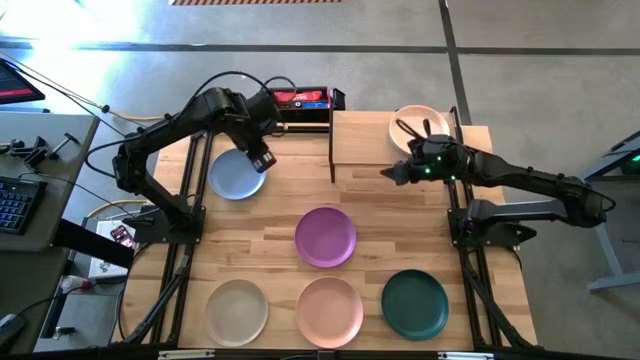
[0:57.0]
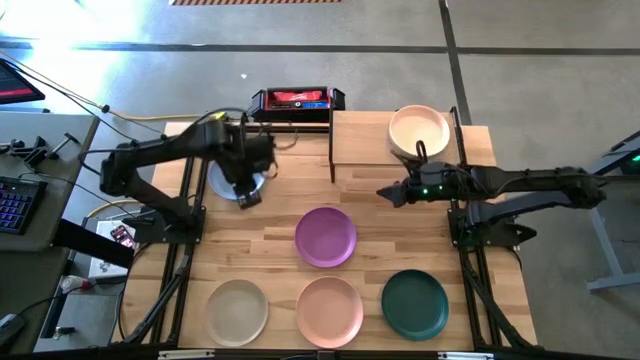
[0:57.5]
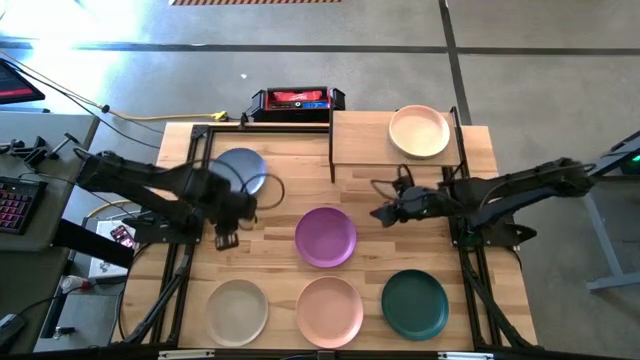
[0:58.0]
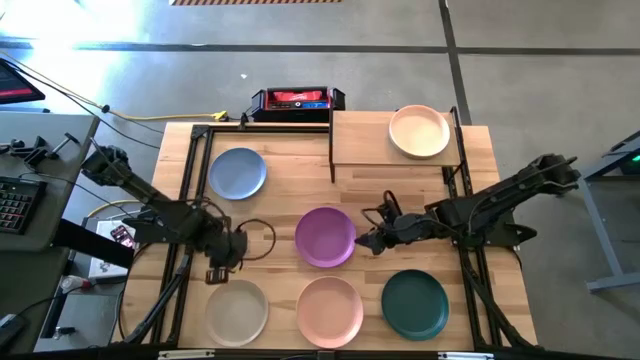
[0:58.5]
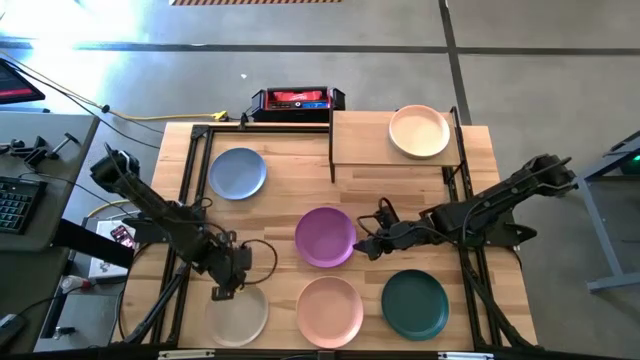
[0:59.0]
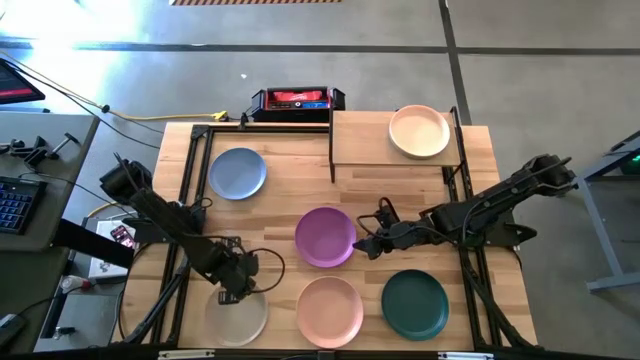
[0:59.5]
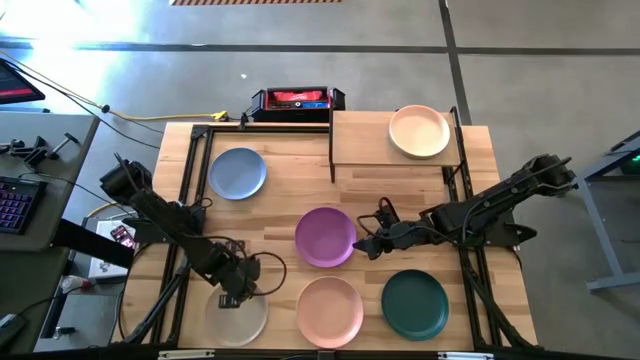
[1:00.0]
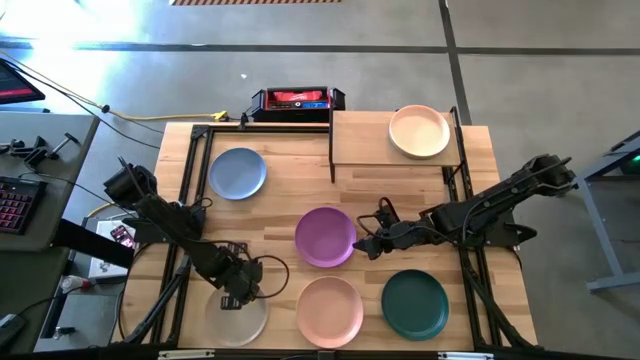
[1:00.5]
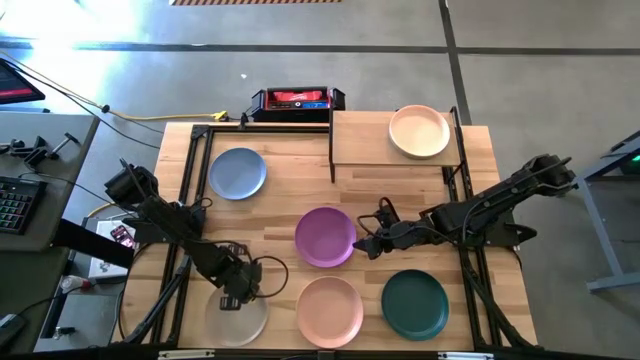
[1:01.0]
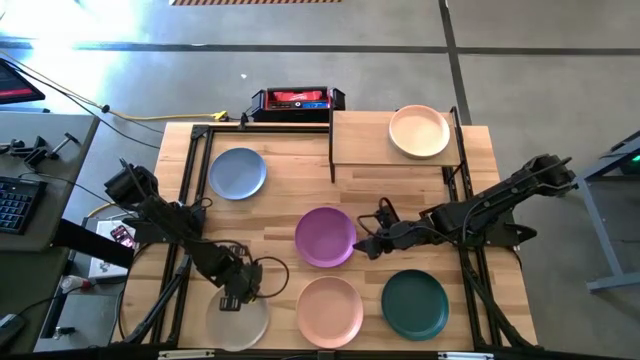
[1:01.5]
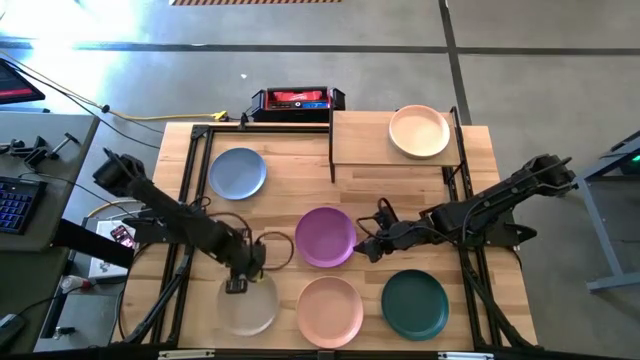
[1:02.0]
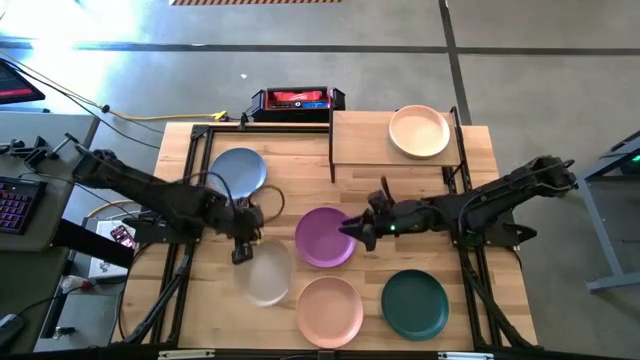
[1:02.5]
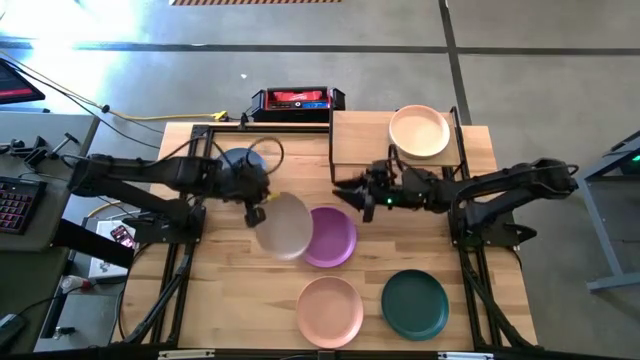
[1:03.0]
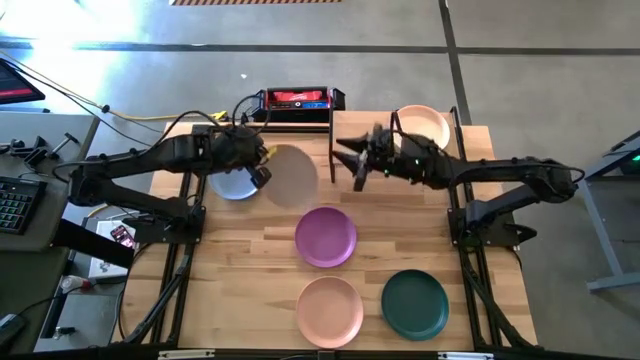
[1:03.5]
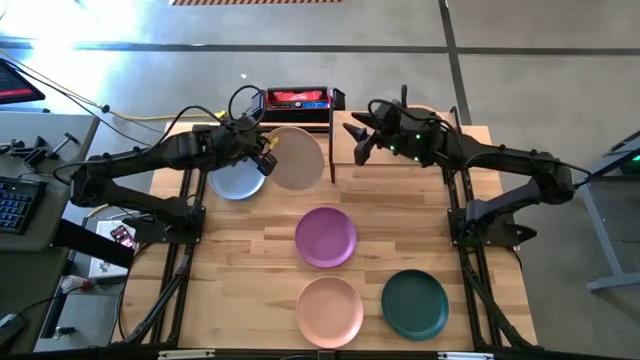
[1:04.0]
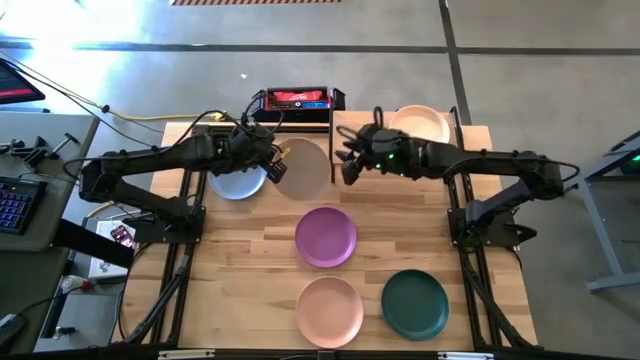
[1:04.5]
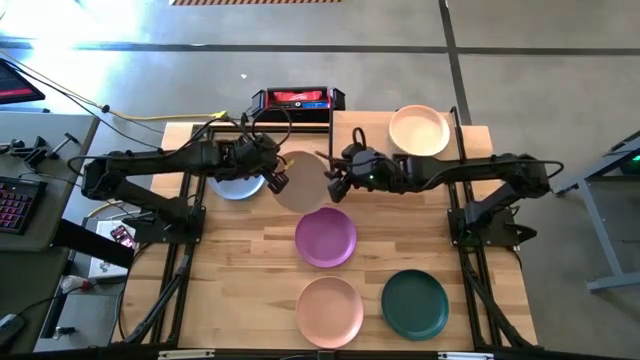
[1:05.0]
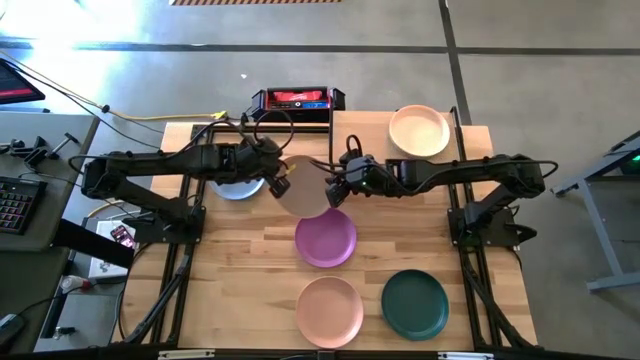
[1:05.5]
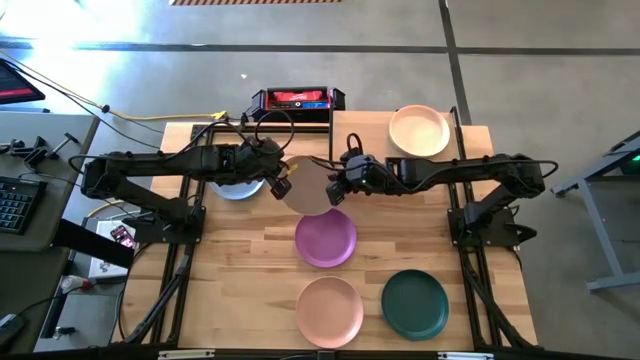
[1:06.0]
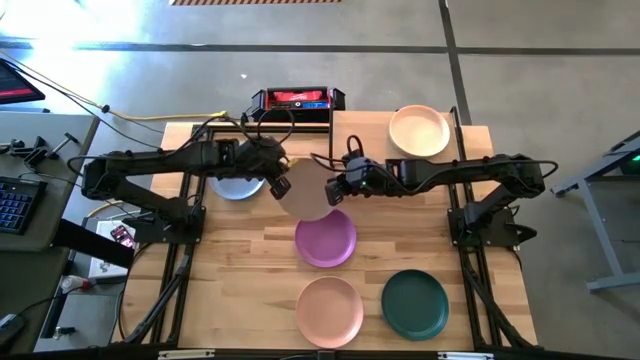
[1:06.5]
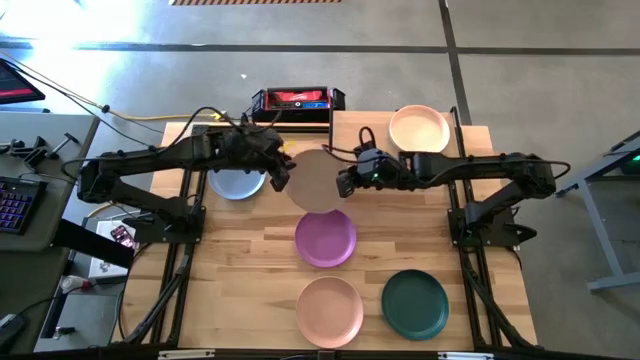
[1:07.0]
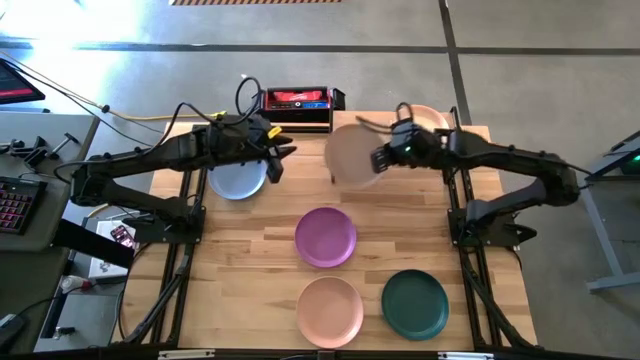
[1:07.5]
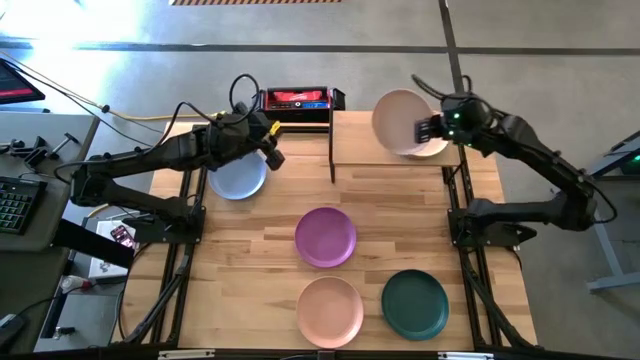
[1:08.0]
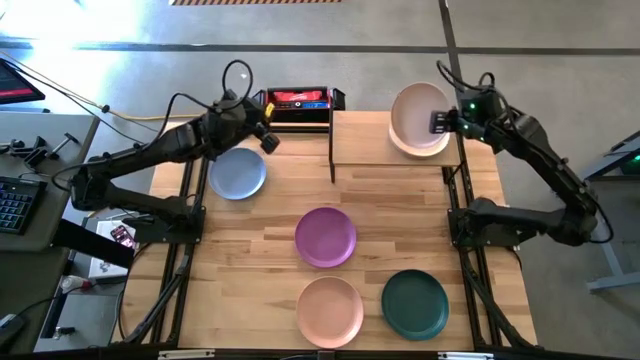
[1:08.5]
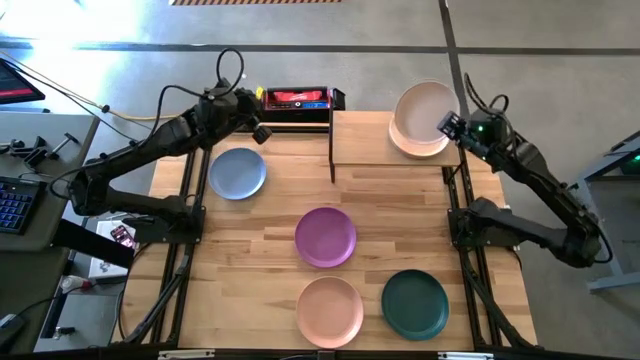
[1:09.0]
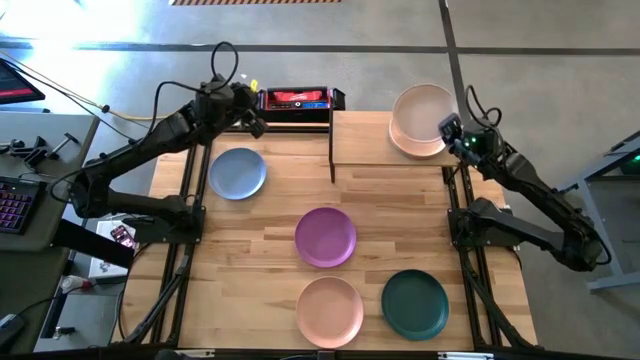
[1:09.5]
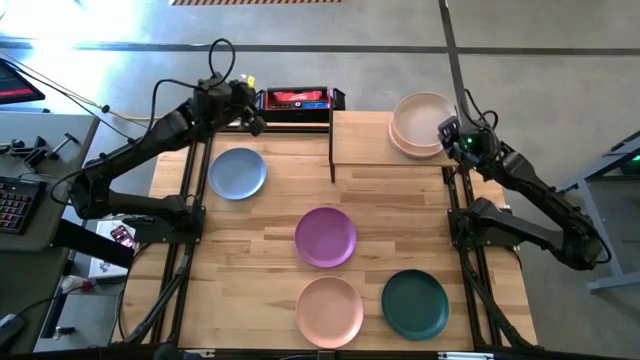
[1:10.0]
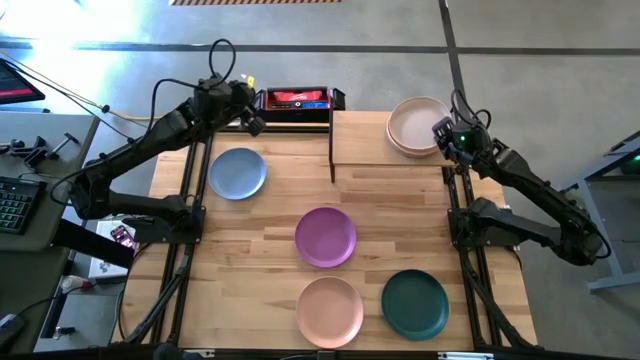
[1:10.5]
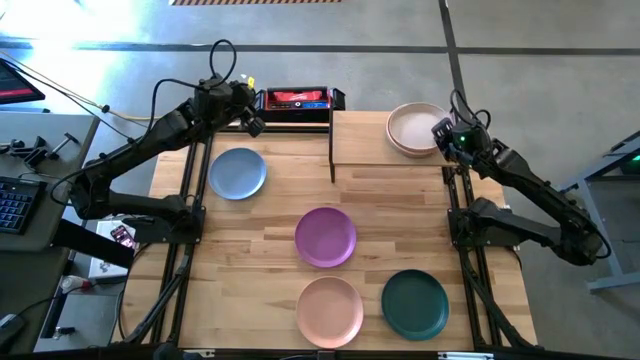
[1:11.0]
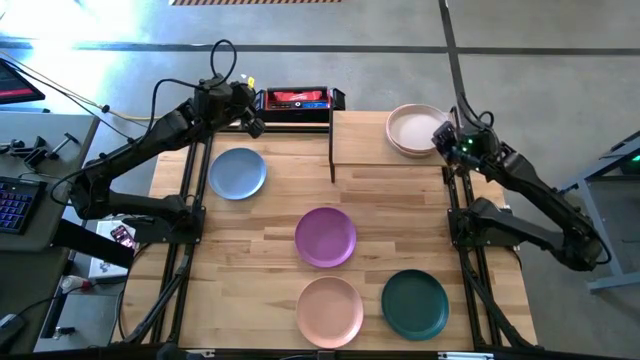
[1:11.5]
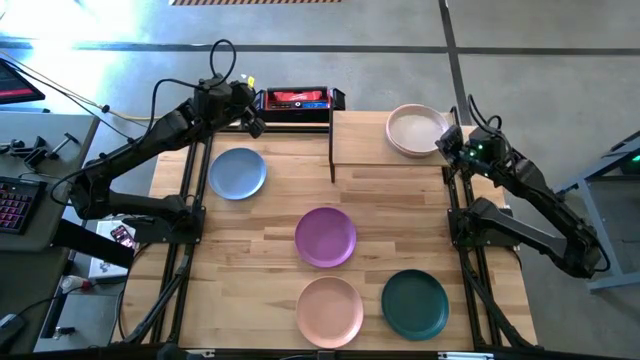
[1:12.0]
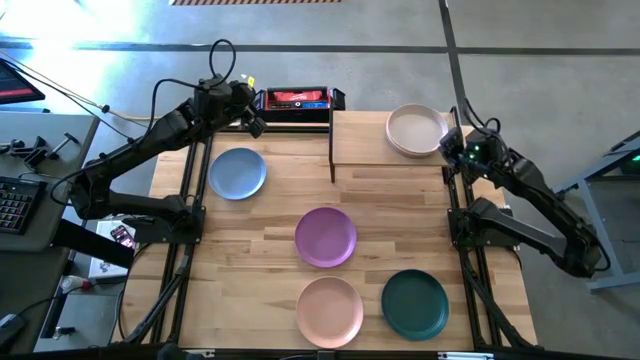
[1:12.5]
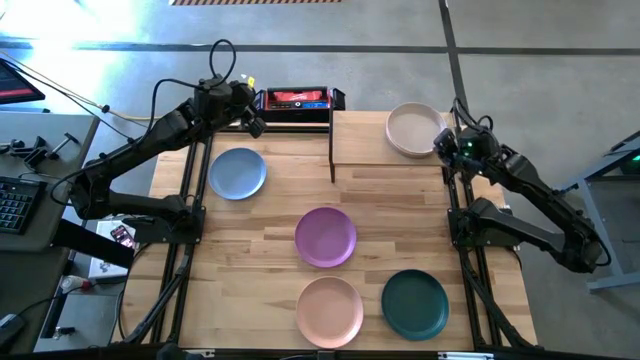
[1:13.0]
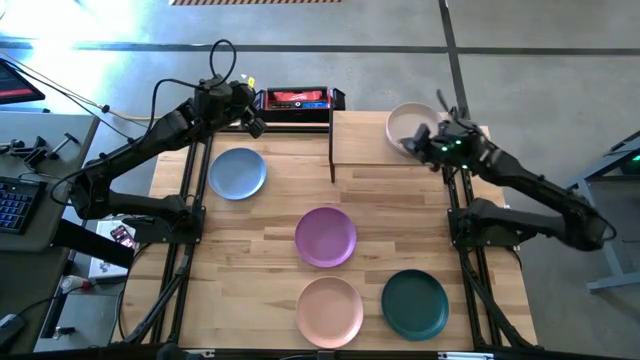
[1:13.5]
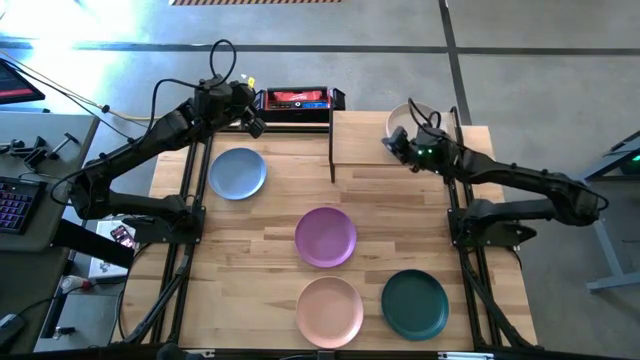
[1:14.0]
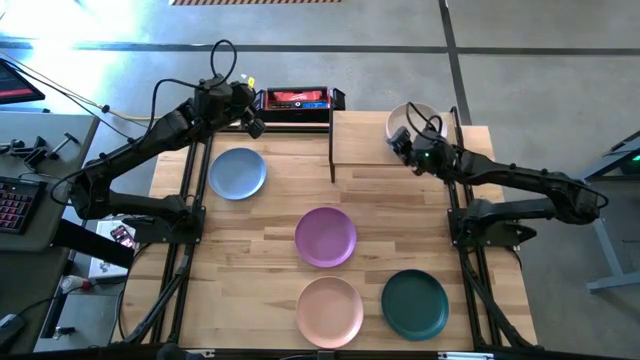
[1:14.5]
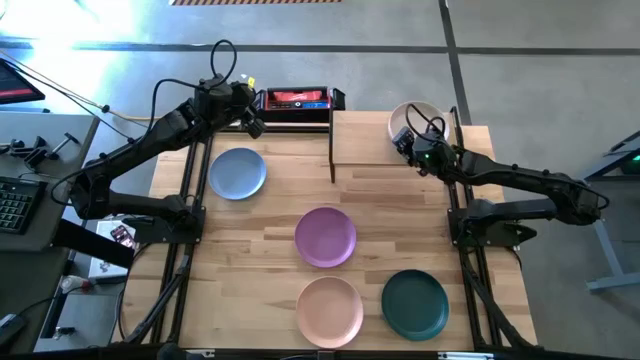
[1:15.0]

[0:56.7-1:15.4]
Task: Place and stack plates onto a shelf
Stack the gray plate on top of the light orange plate on the shelf

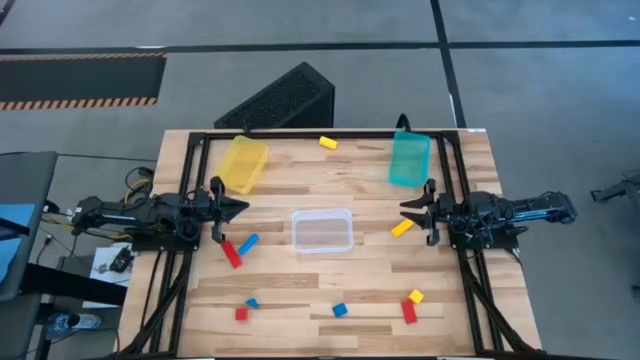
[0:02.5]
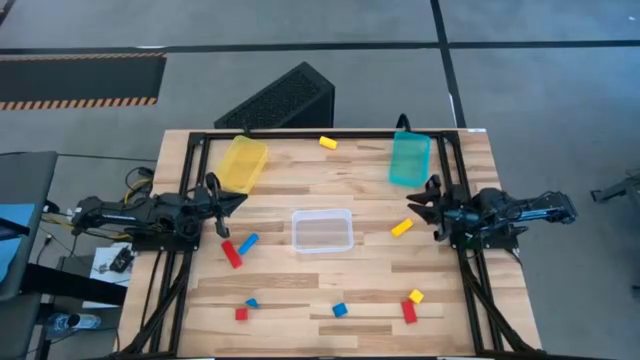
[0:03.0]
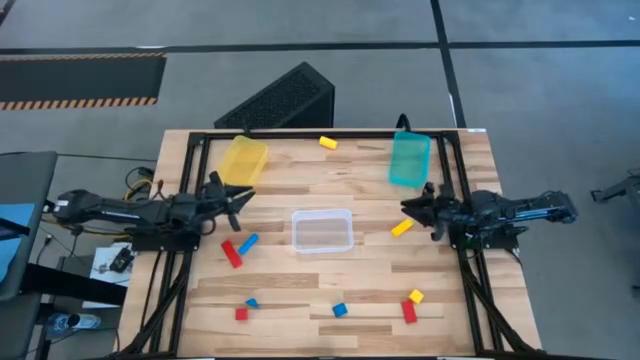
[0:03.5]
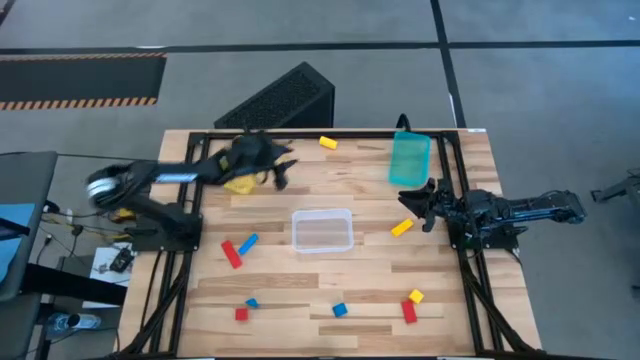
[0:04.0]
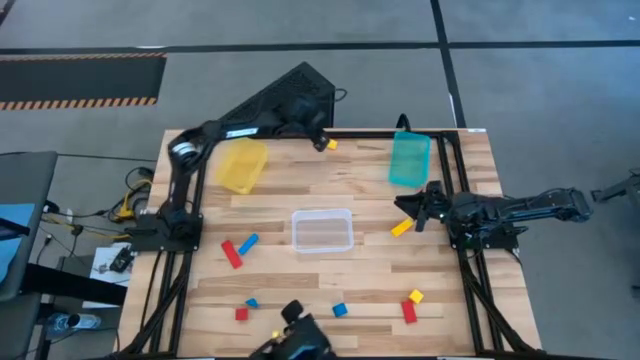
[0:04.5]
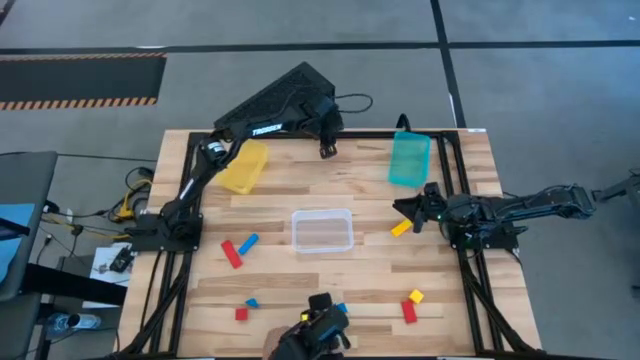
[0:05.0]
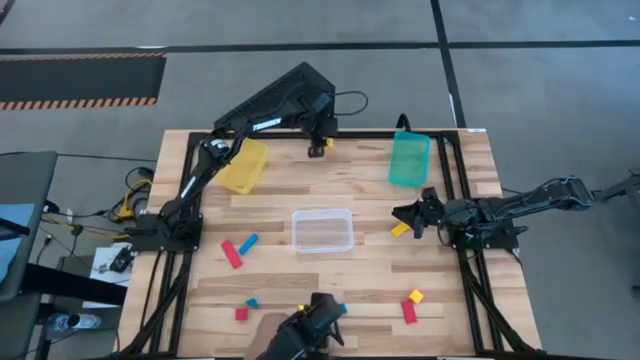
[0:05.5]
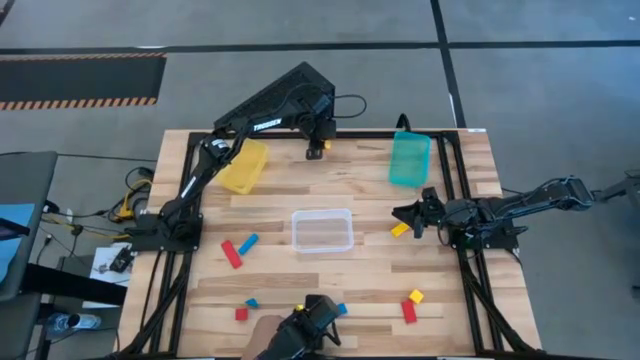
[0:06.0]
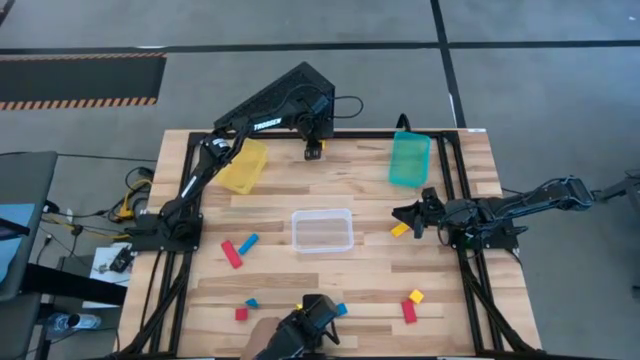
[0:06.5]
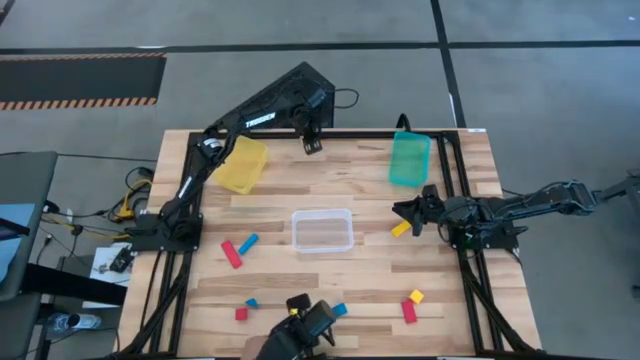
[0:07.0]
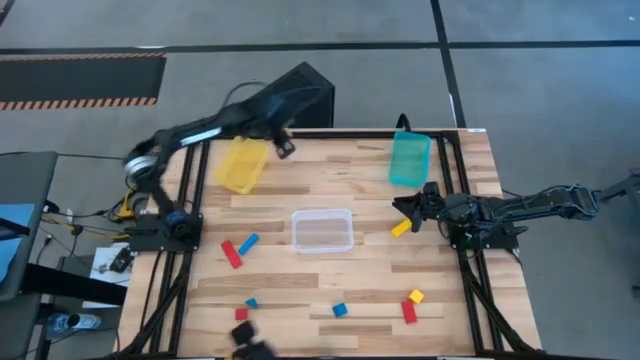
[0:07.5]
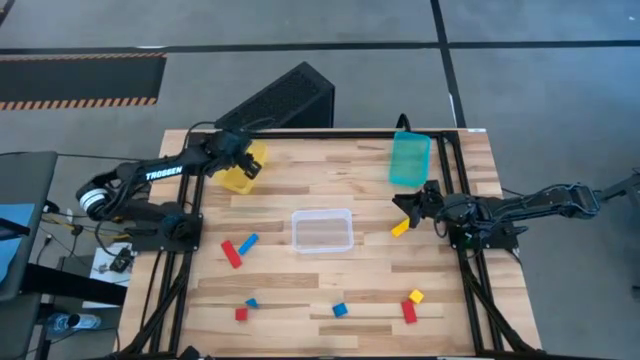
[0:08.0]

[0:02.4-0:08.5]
Task: Sort & place blocks by color
Put the top yellow block into the yellow bin
